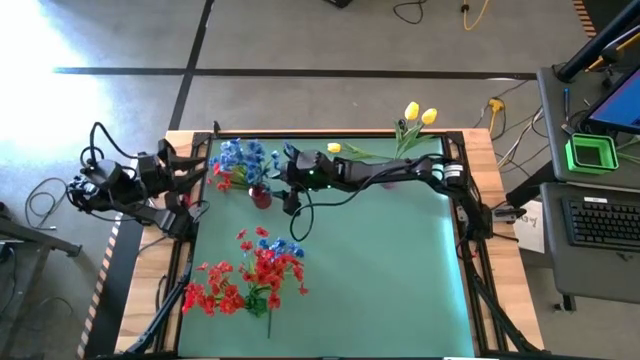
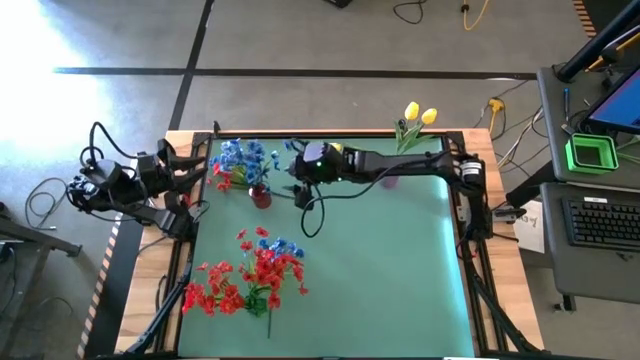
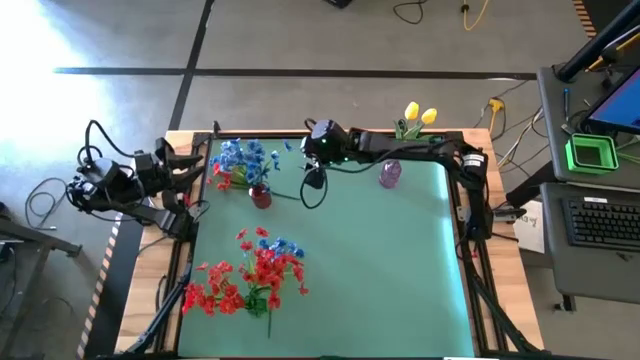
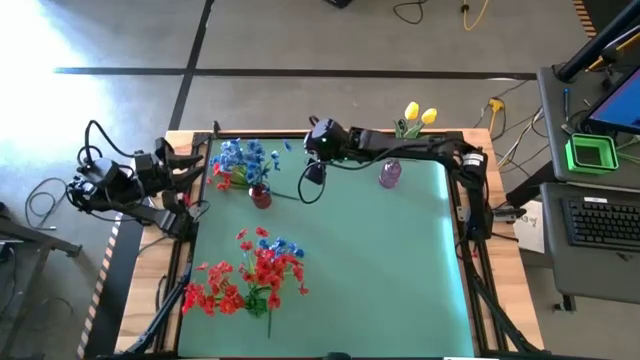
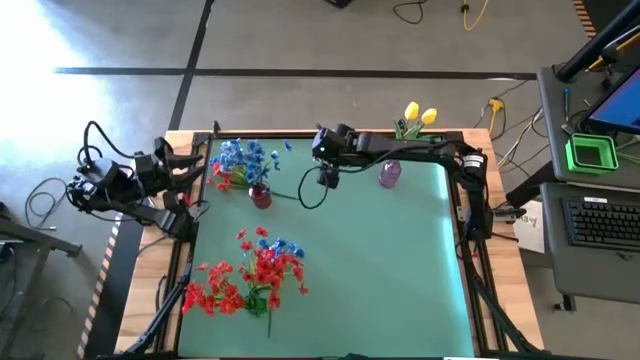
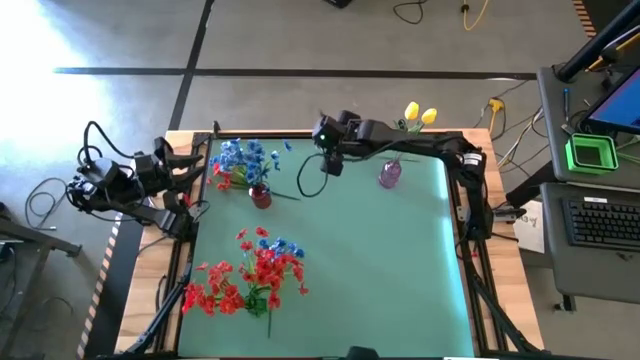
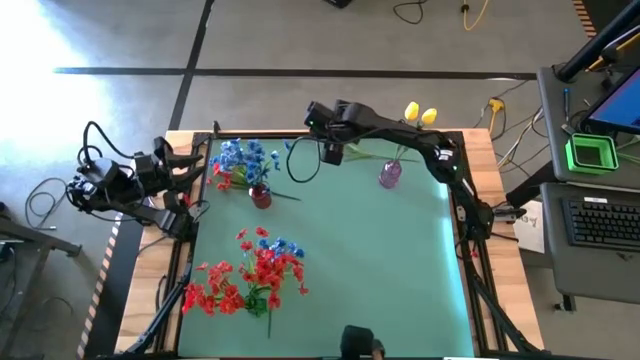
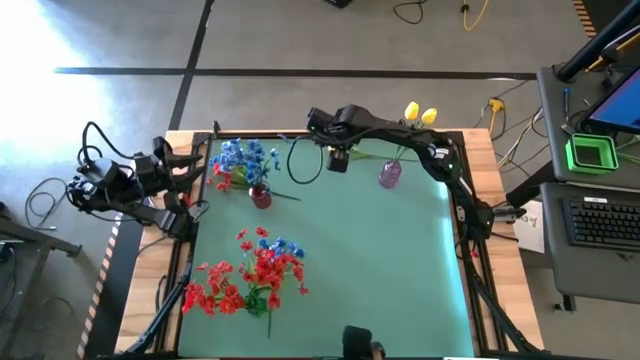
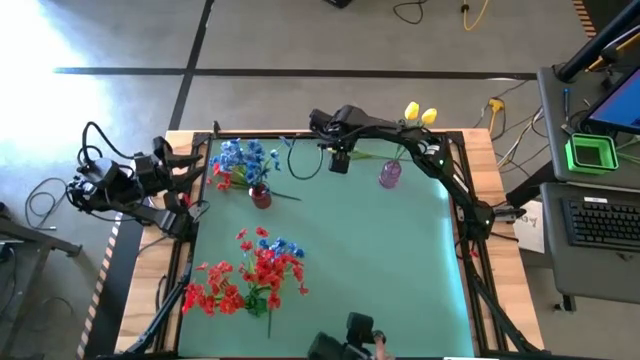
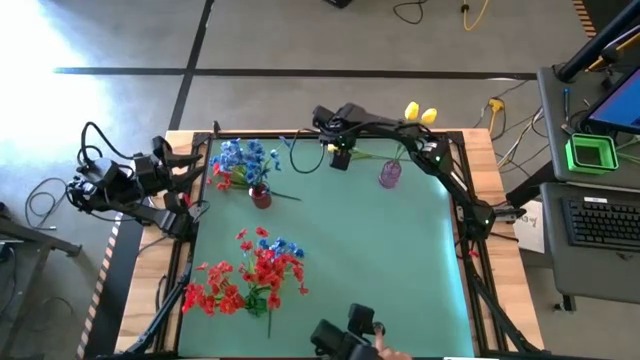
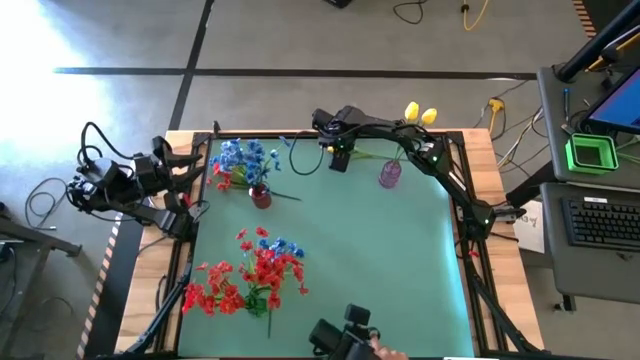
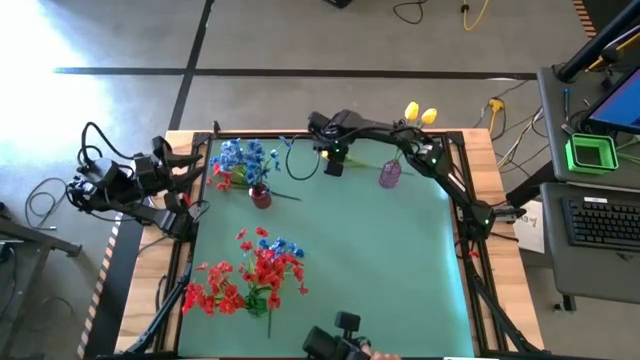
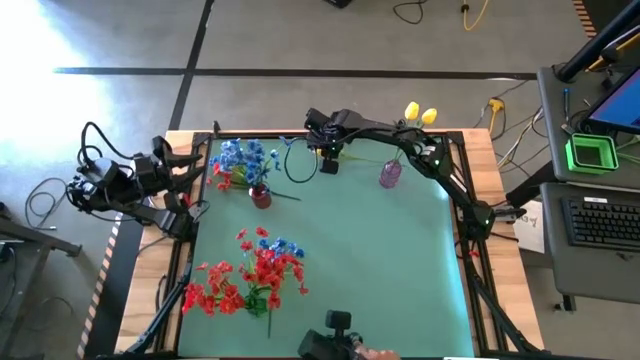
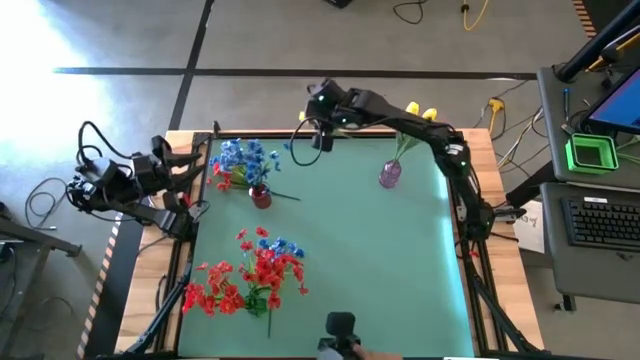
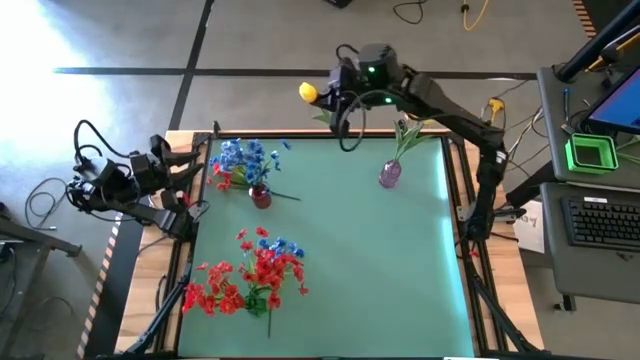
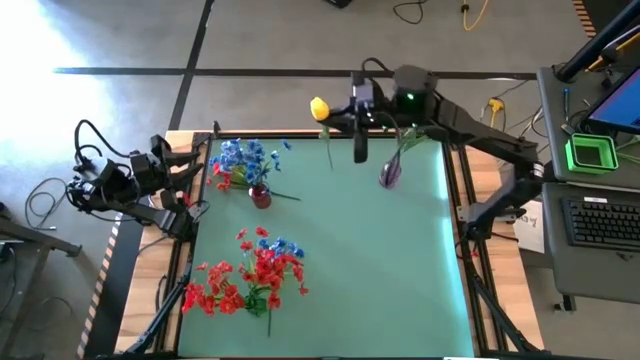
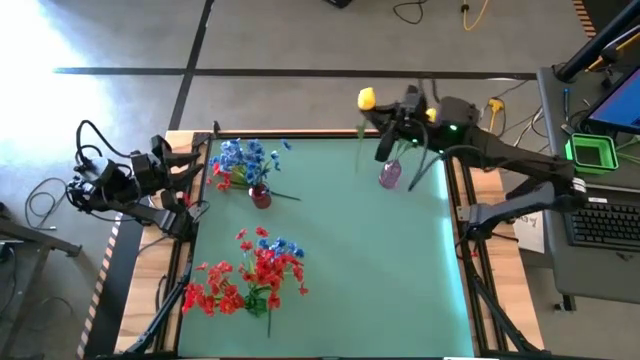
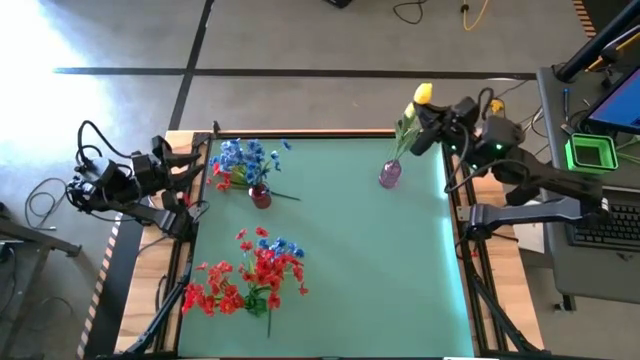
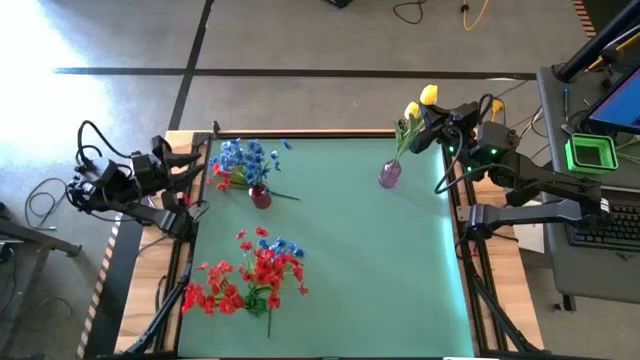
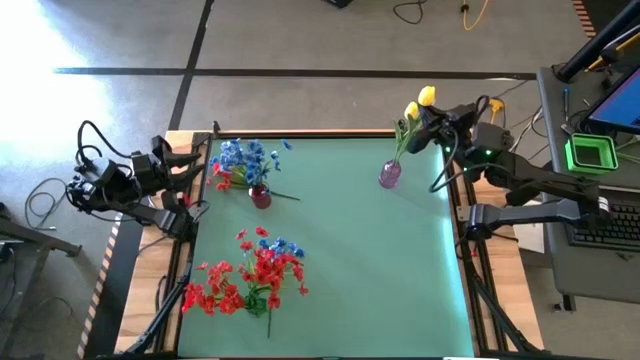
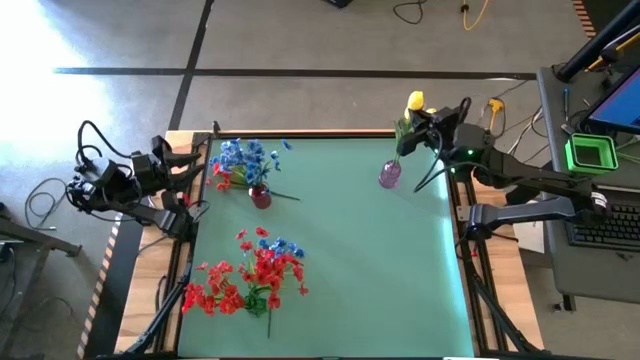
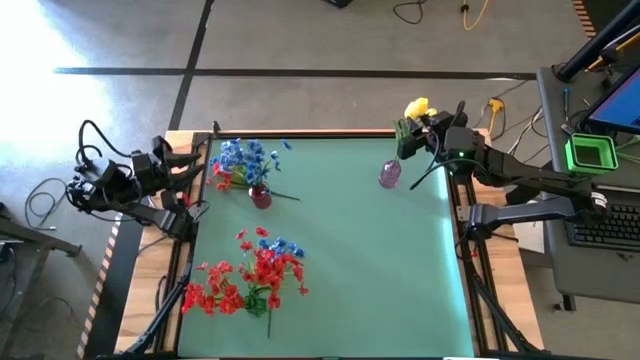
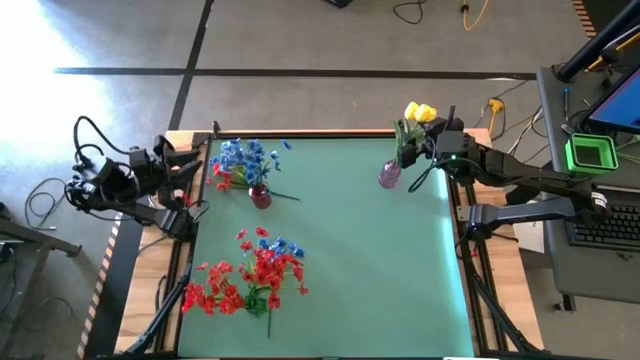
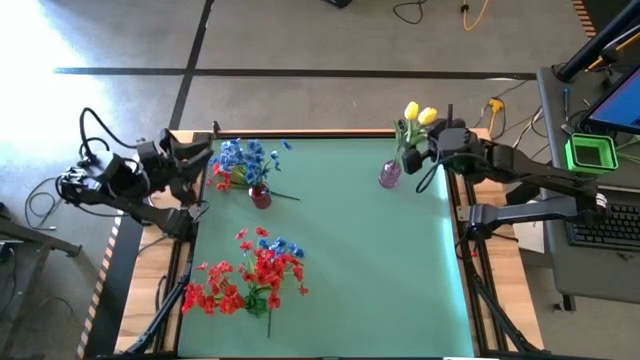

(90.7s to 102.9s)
Task: Sort flowers into vase by color
Put the yellow tulip into the purple vase

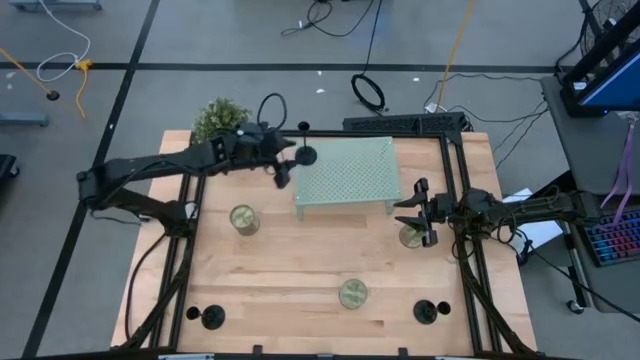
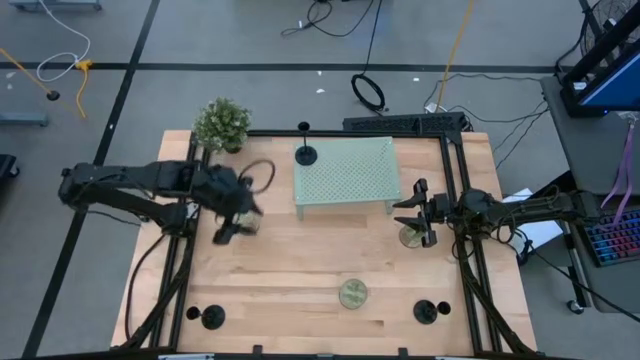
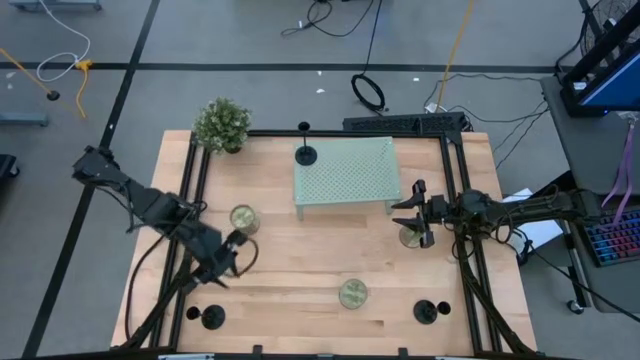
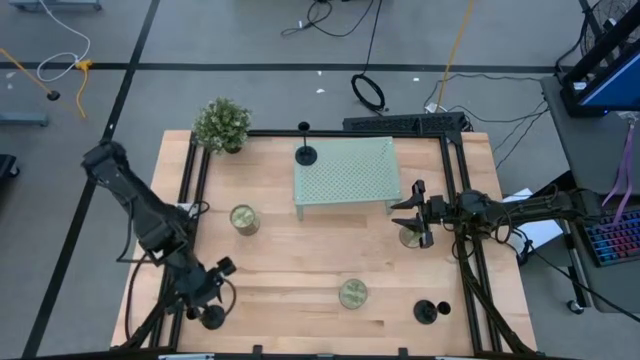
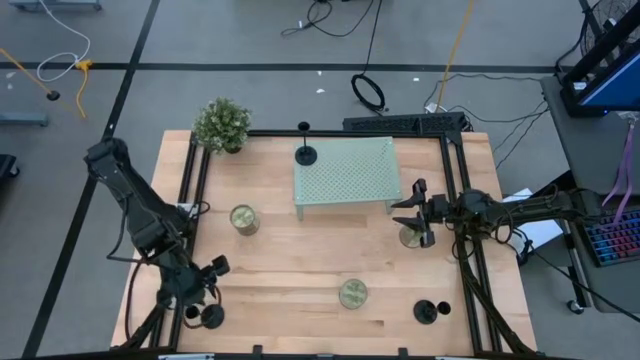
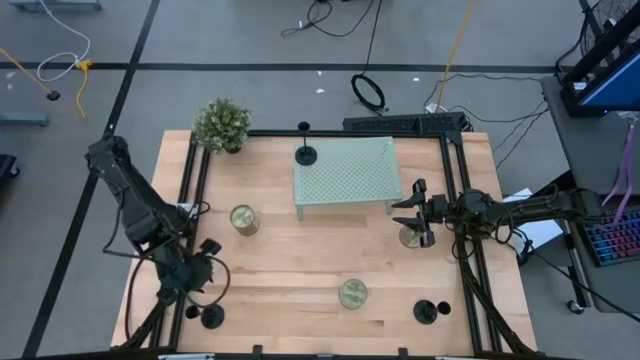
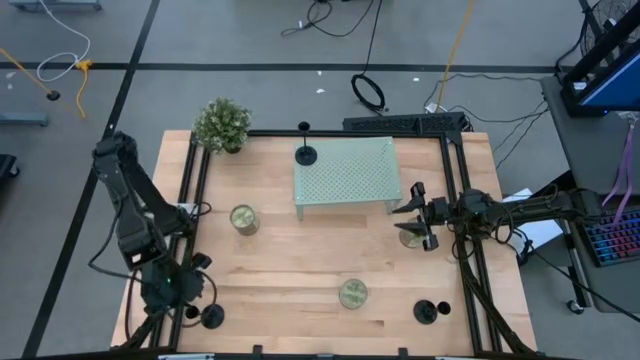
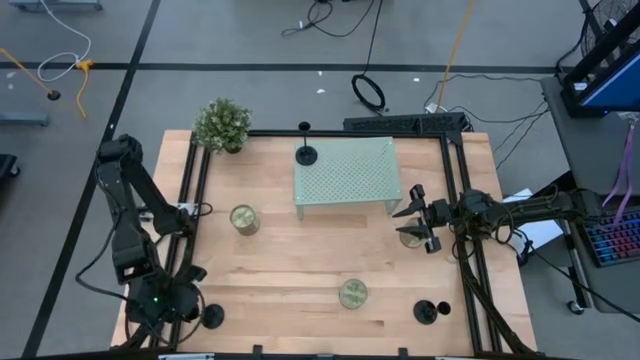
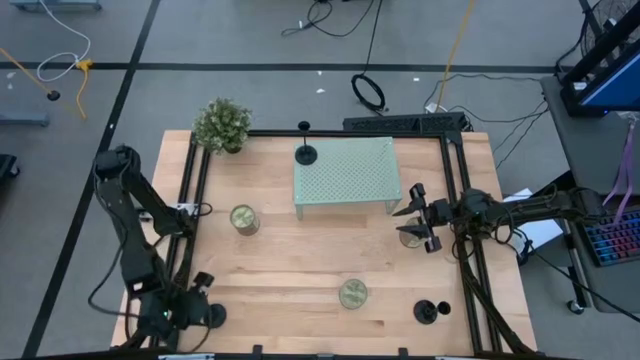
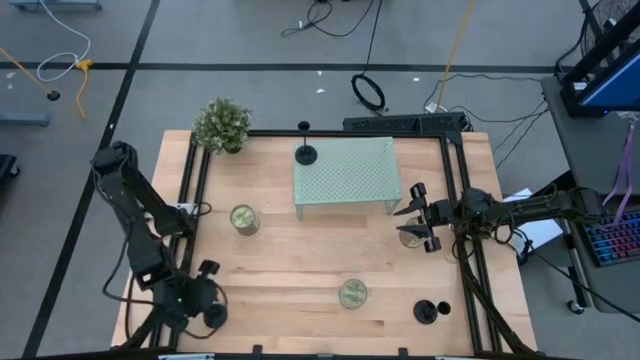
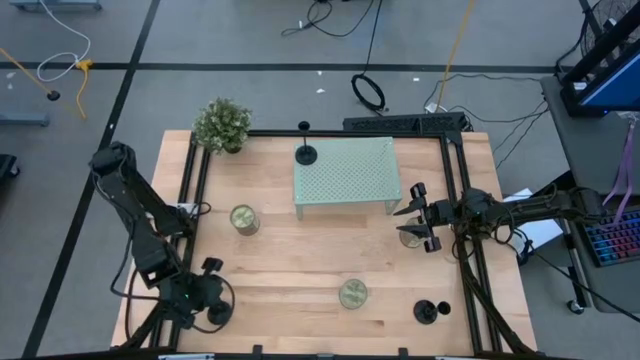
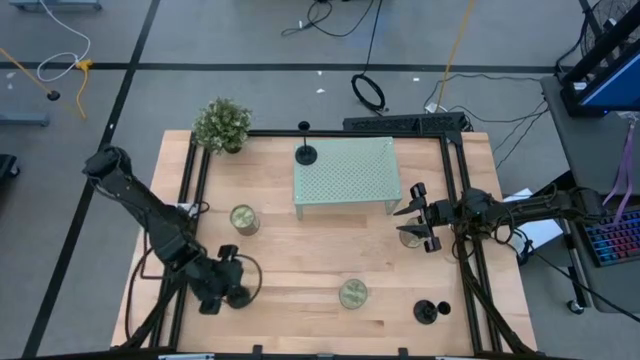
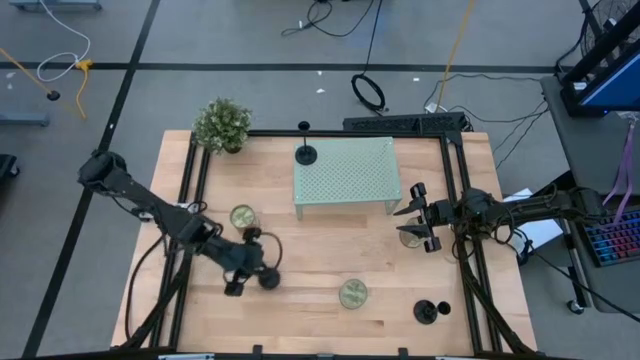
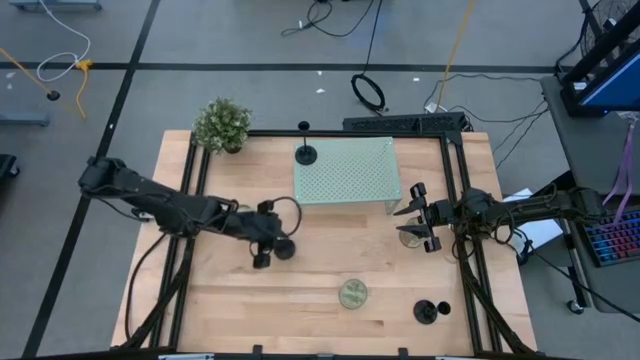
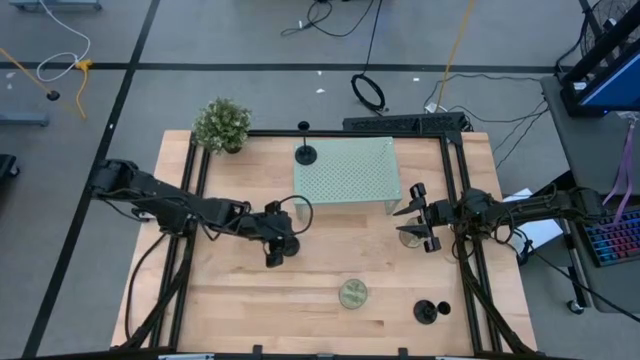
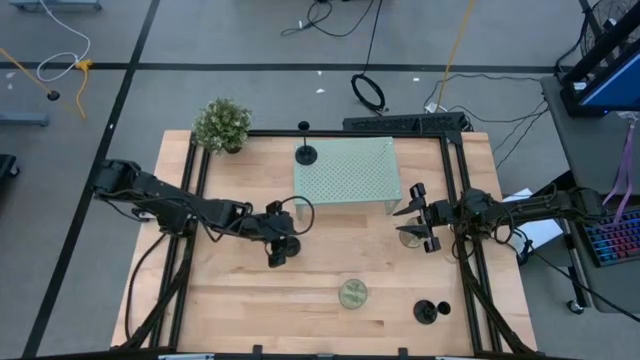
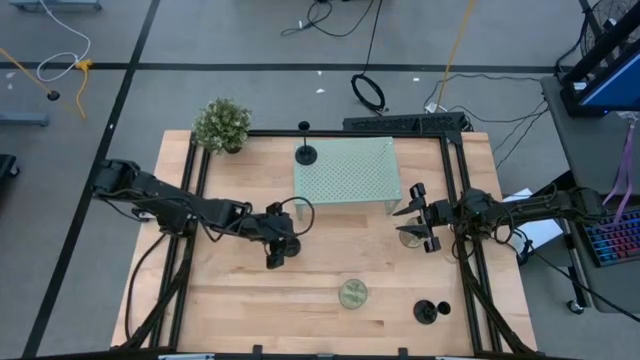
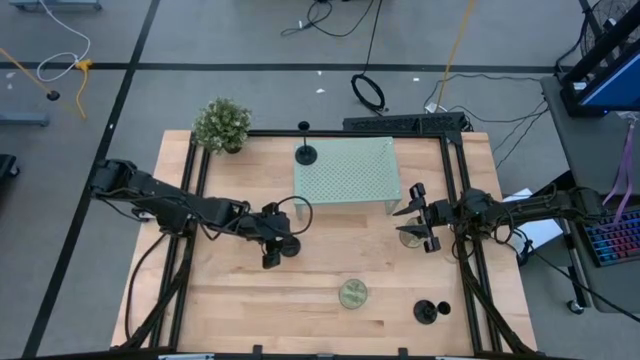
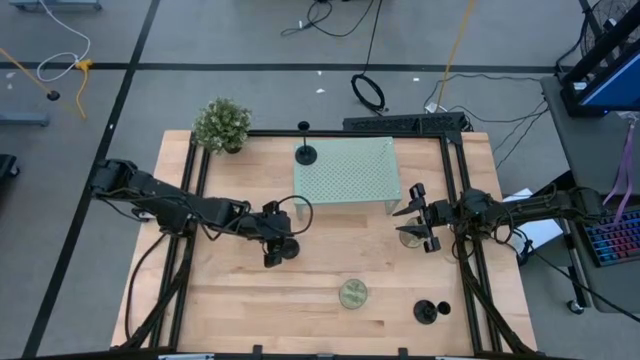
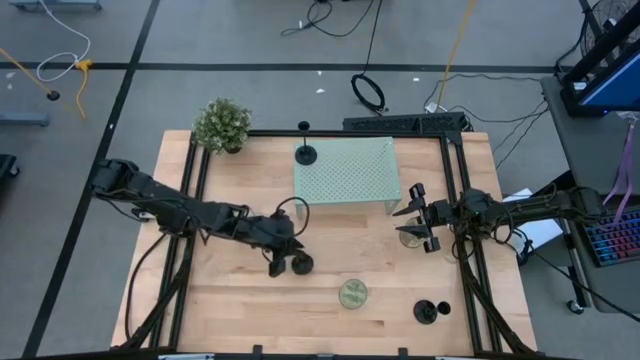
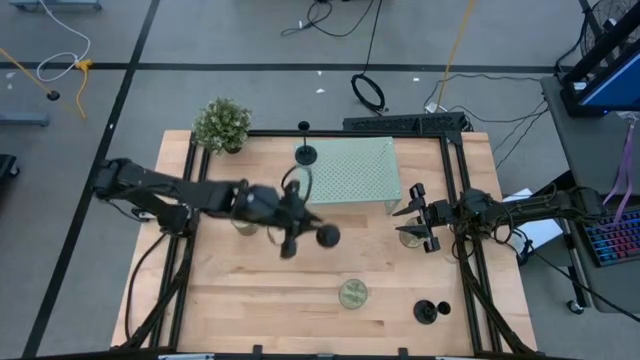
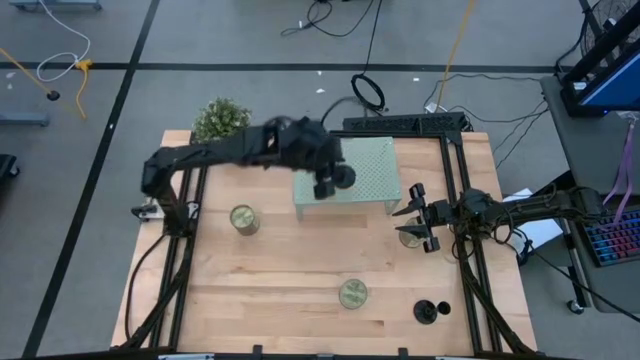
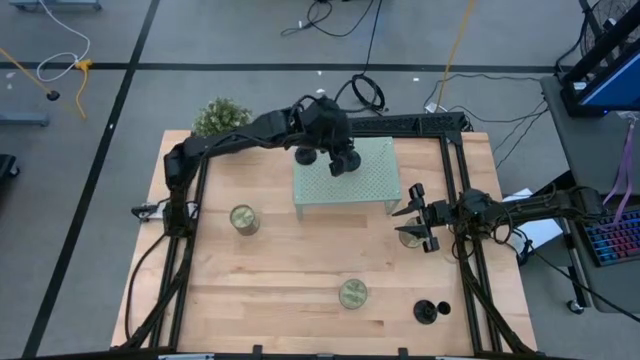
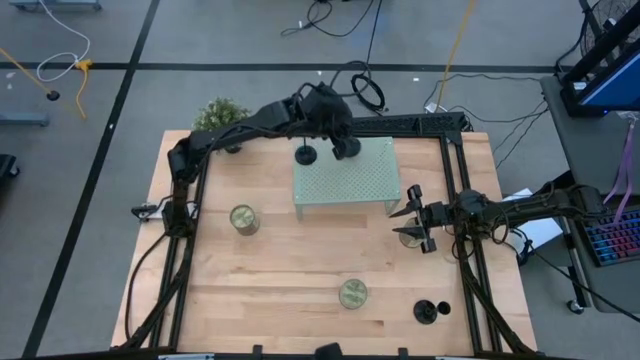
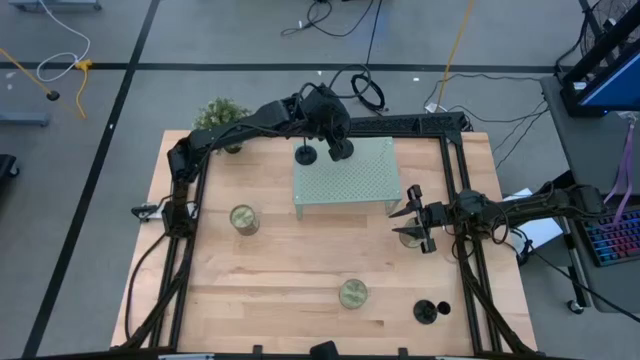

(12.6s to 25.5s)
Task: Pick & Place candle stick holders
Align the left black candle holder with the black candle holder on the shelf
